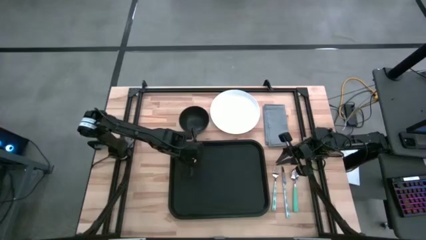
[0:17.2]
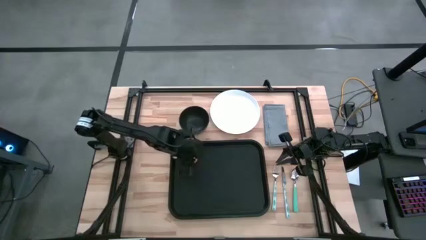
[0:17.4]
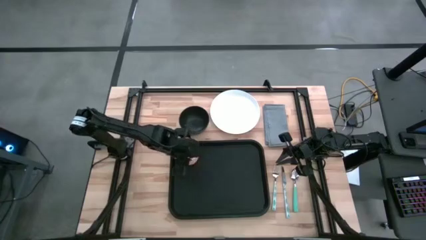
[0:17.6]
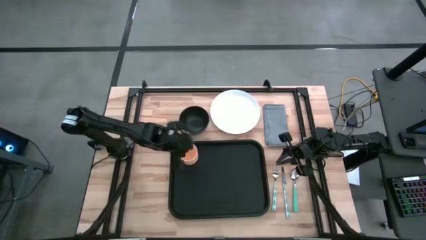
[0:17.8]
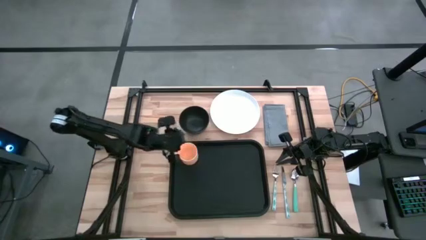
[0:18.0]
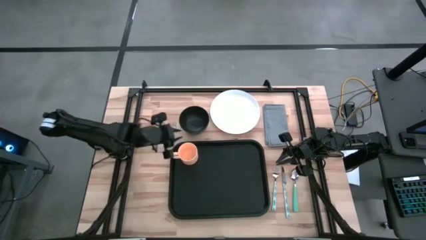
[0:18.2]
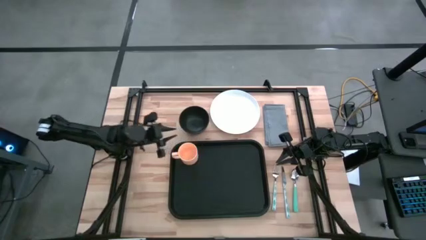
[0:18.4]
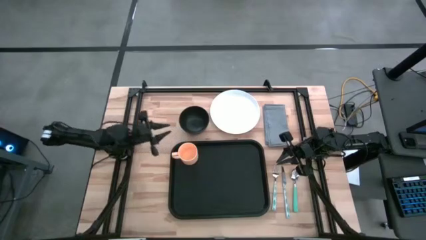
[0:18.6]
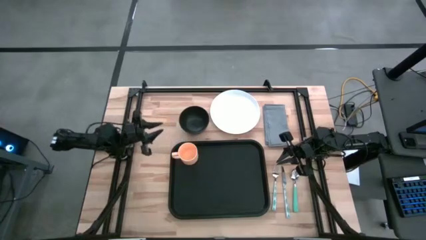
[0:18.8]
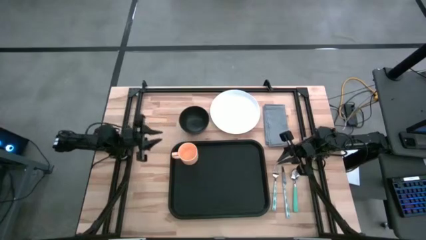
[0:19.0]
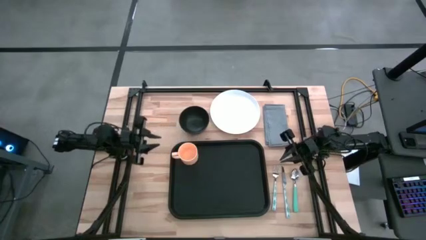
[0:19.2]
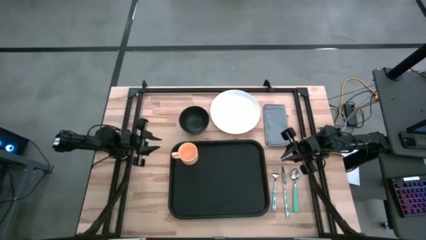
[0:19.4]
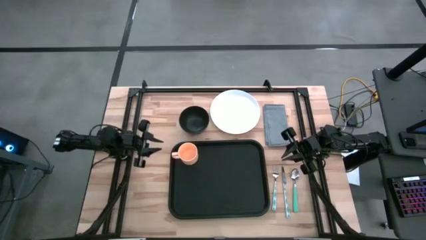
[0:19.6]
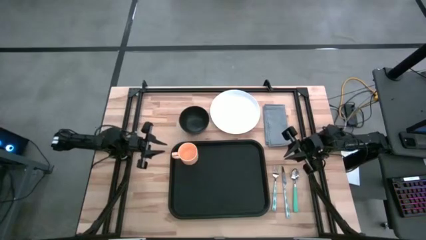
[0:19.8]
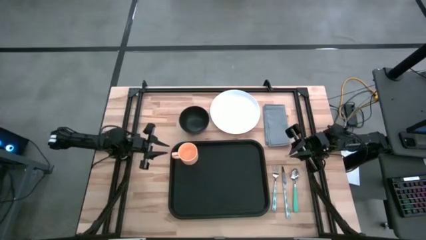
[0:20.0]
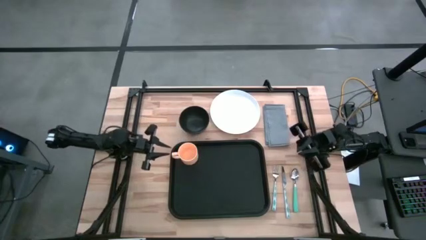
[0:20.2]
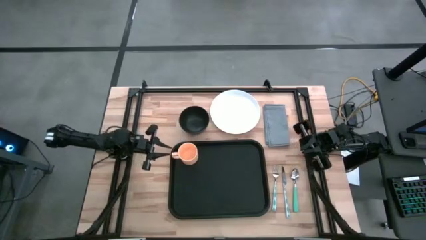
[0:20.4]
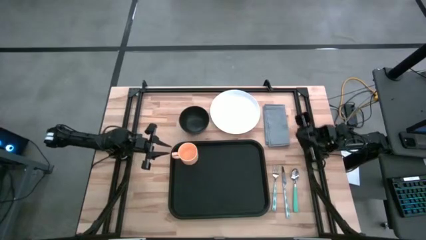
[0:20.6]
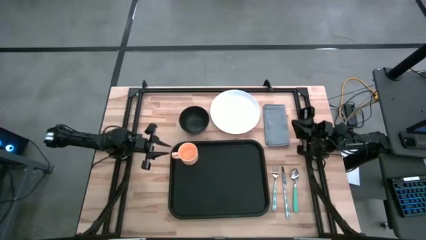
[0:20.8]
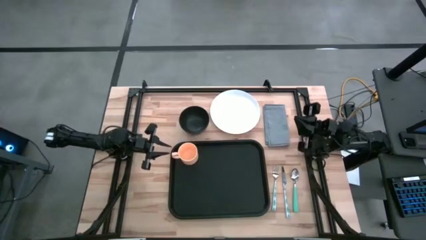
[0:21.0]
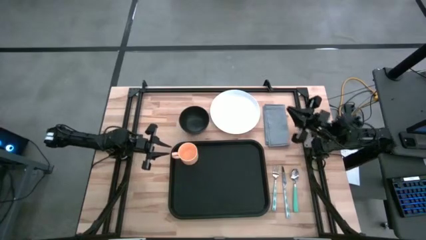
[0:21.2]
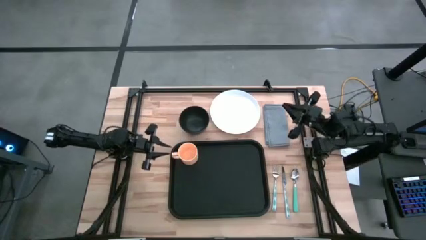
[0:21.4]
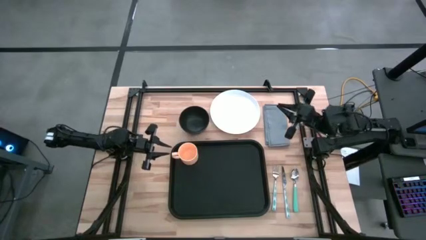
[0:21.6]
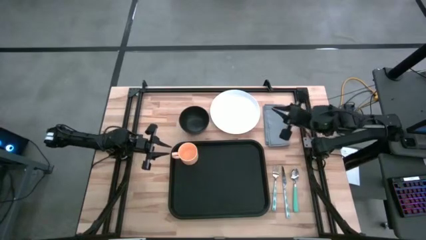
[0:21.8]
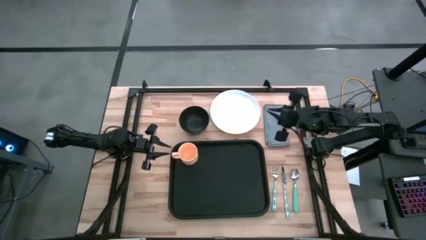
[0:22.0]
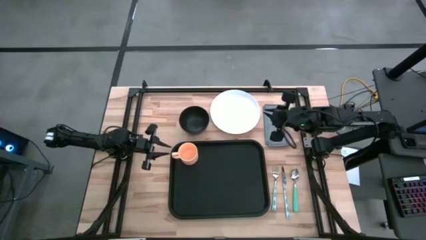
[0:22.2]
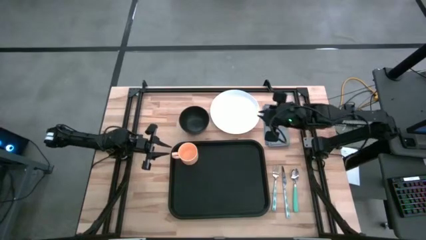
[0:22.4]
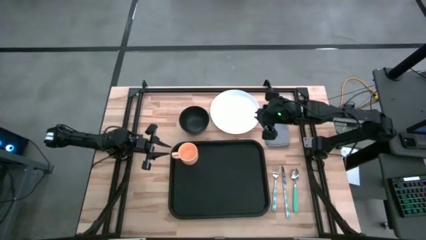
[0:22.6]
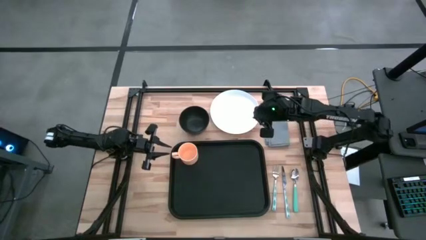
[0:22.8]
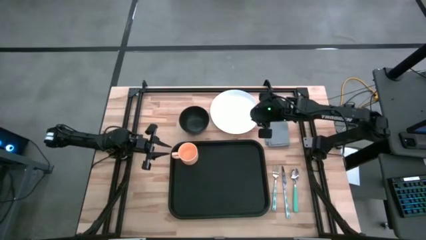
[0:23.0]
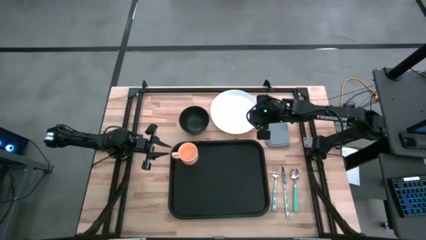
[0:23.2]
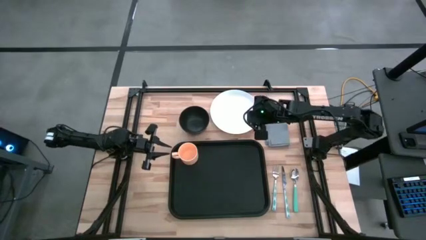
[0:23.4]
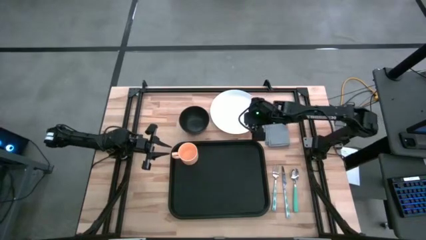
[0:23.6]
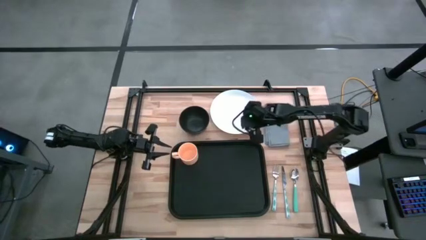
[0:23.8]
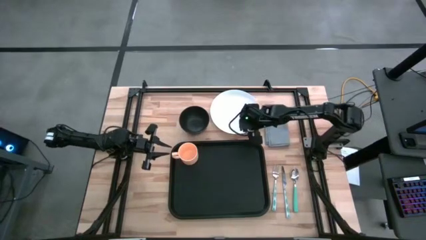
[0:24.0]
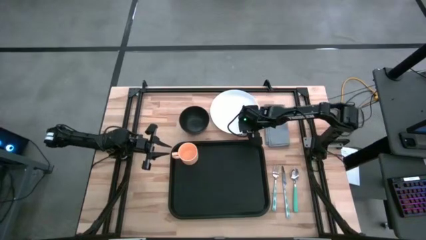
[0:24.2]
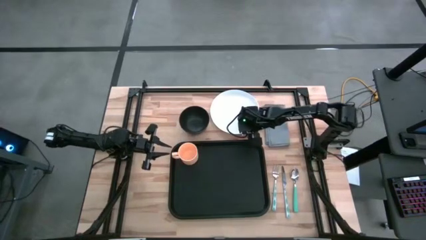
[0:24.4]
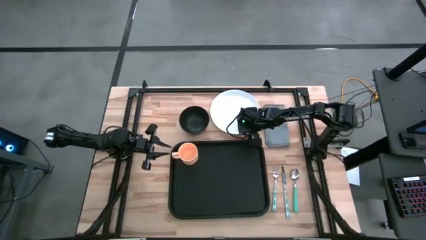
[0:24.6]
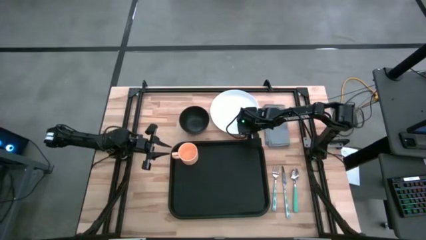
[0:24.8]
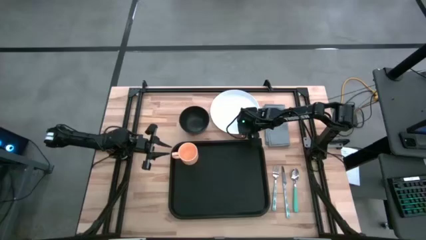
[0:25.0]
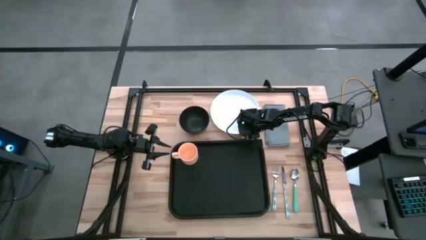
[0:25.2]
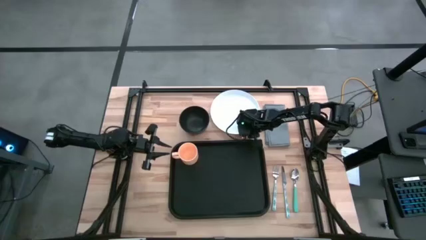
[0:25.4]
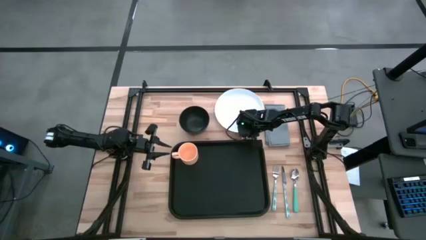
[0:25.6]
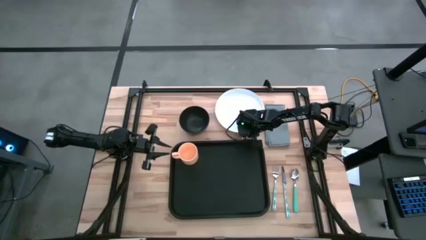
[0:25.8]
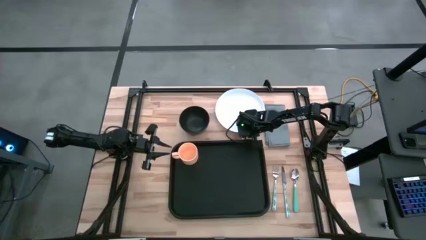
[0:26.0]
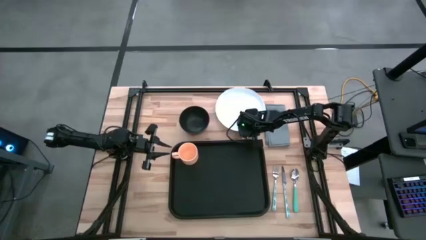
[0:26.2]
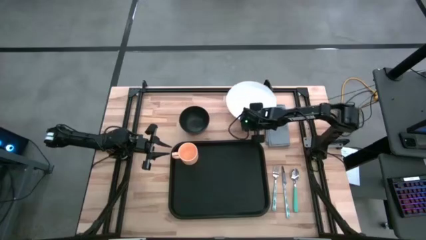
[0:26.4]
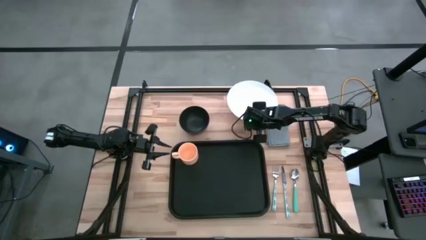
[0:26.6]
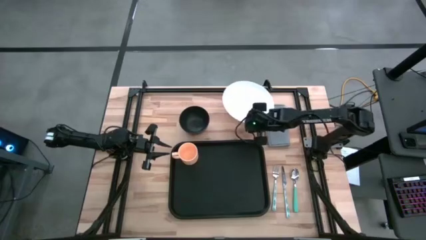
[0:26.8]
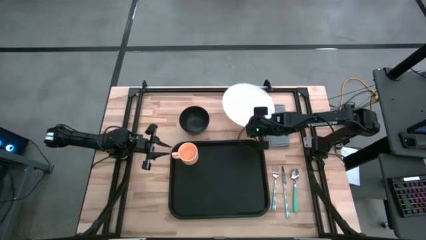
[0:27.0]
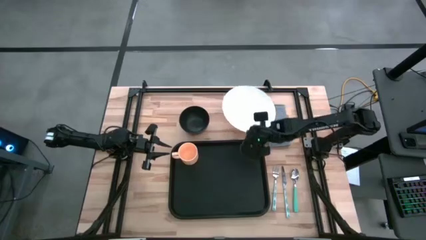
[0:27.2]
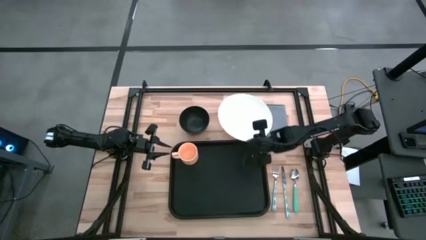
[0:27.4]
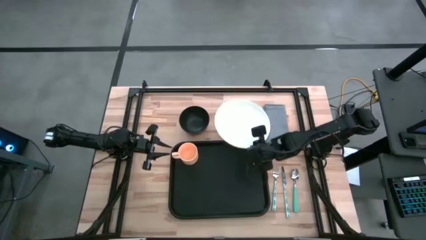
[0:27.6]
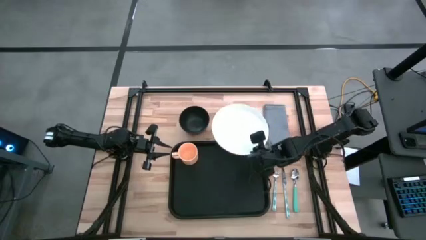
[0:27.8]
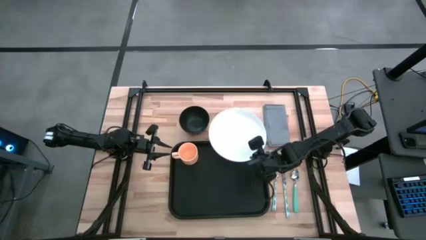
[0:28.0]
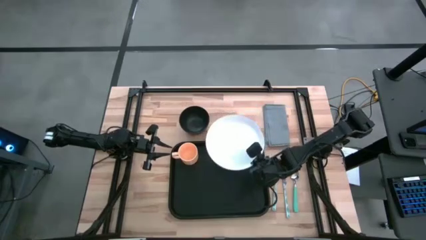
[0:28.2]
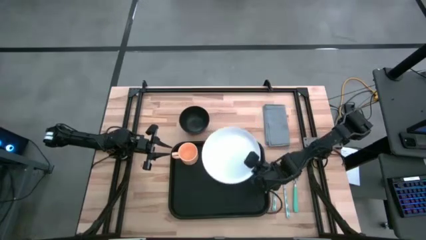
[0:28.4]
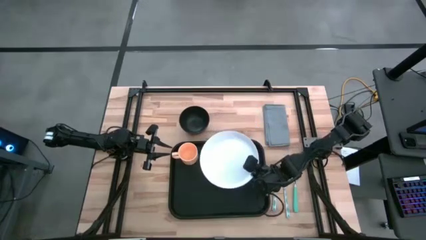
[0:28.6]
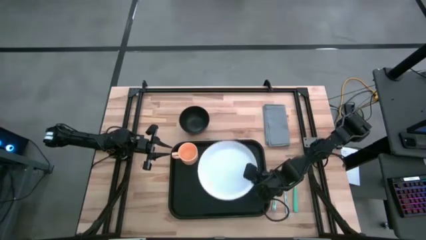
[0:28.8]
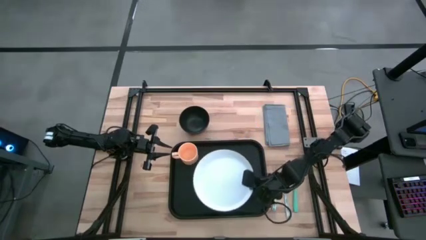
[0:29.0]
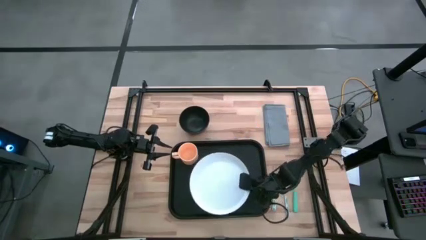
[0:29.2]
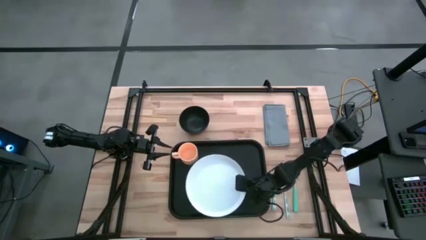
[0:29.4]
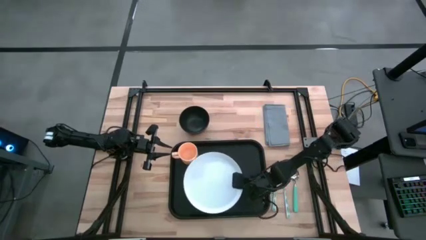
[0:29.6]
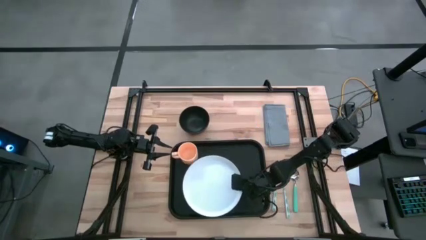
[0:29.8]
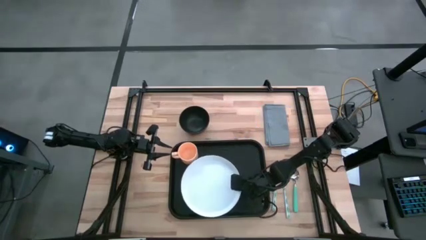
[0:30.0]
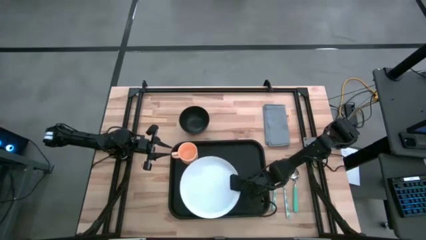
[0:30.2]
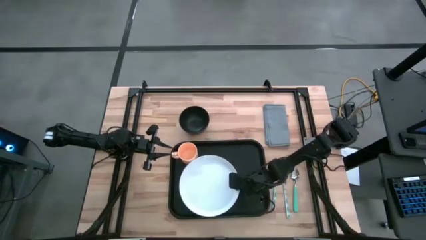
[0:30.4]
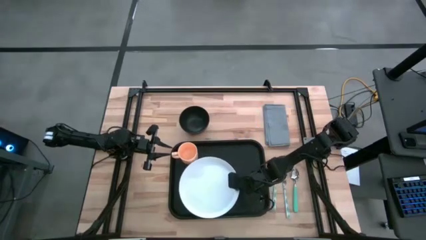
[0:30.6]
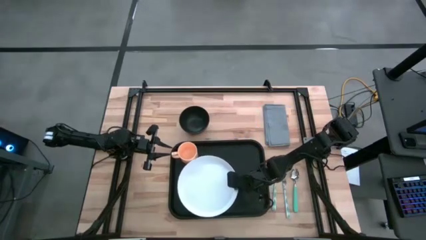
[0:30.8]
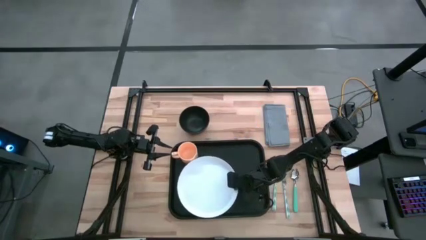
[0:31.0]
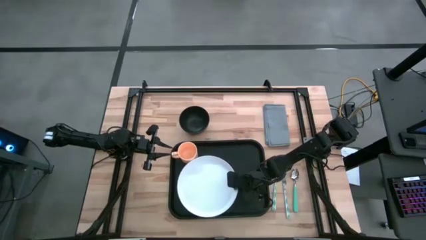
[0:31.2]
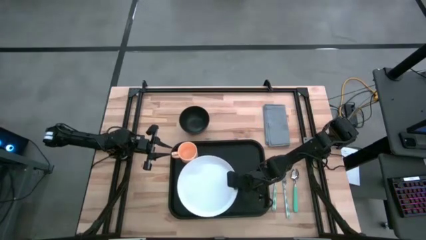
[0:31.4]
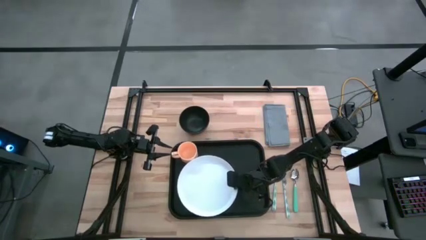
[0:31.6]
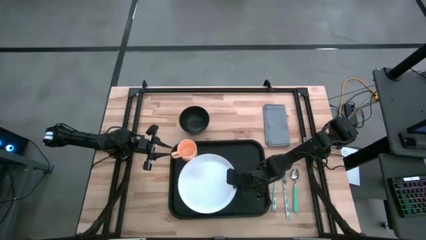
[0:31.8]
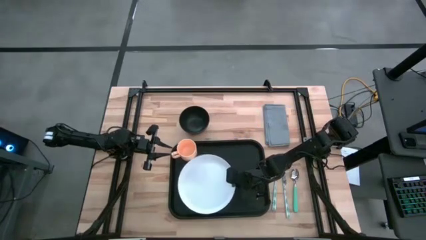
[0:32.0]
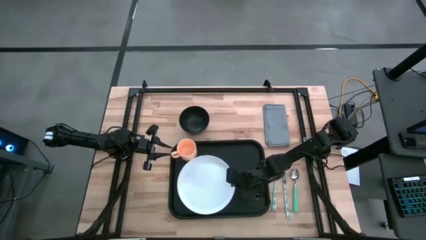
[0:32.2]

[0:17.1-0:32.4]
Task: Set up tray
Put the white plate on the black serving tray below the orange mug

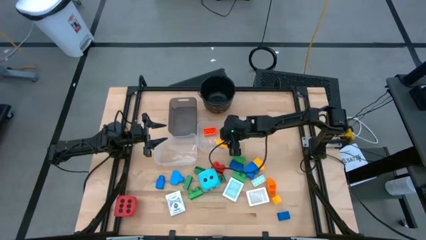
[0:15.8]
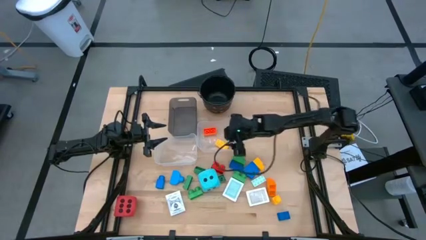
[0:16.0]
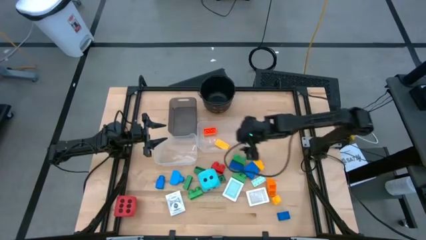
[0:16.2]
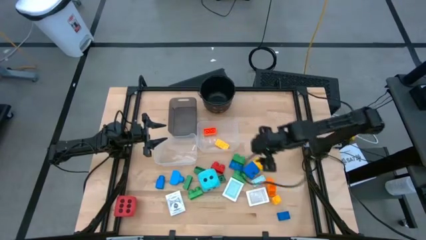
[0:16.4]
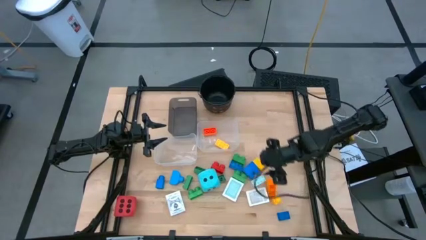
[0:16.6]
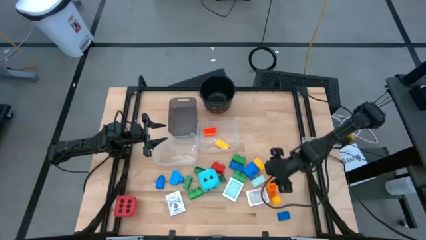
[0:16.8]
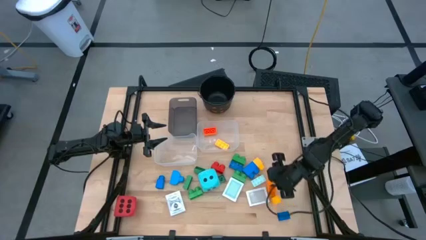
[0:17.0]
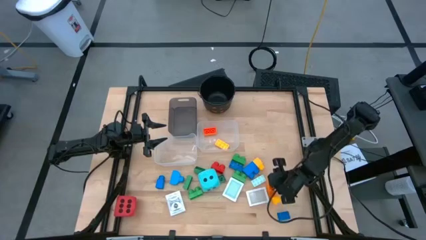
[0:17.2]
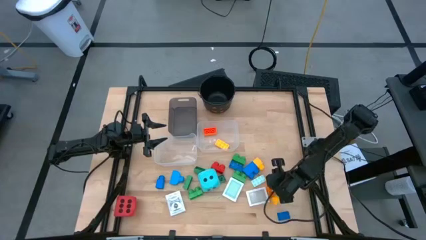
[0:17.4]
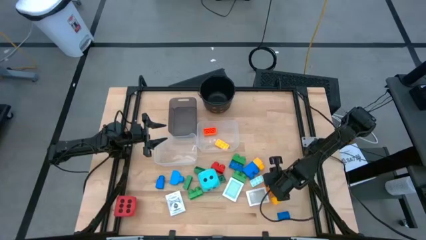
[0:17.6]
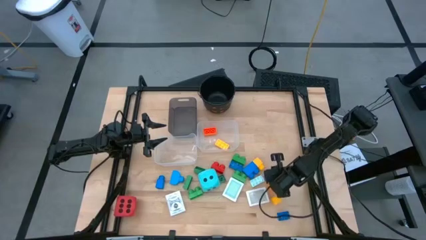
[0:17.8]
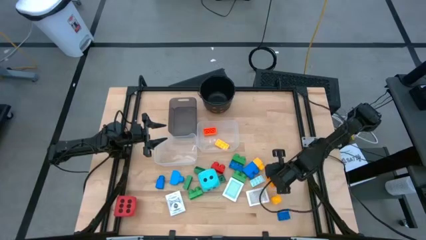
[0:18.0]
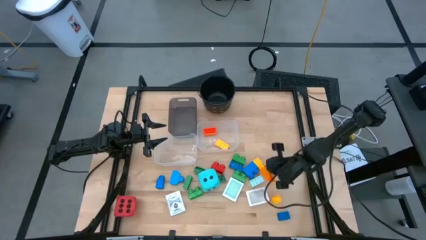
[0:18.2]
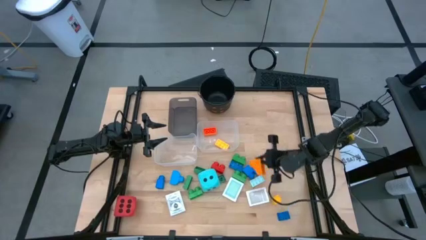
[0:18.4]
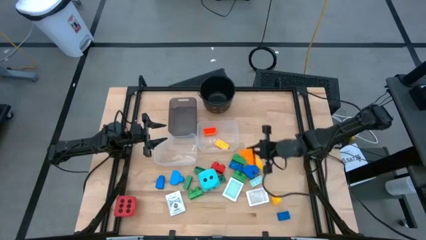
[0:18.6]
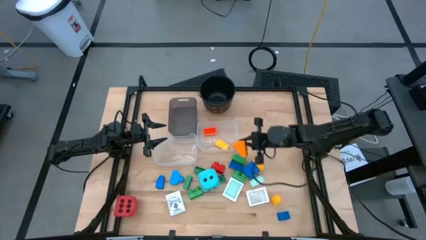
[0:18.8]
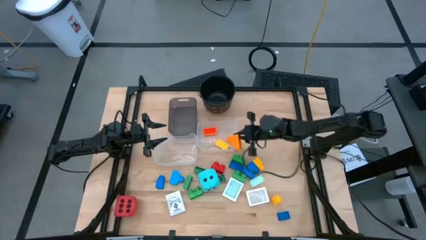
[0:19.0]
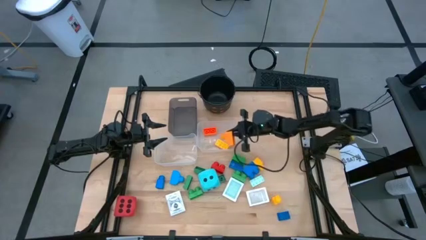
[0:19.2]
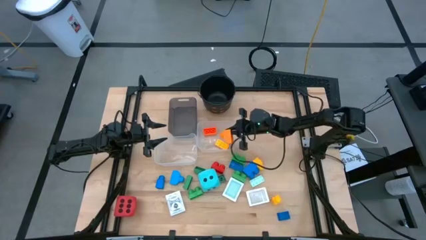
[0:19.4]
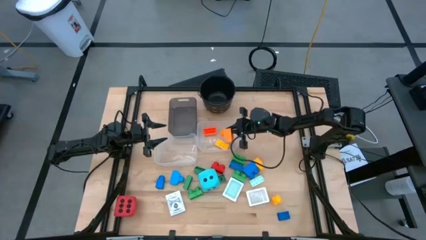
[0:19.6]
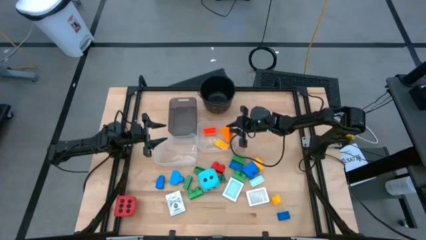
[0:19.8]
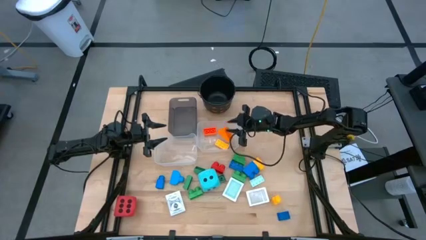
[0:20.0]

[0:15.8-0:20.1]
Task: Pick & Place Toys
Put the orange game piece into the right transparent bin
